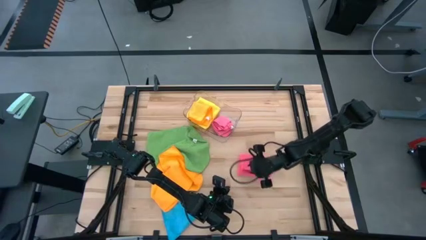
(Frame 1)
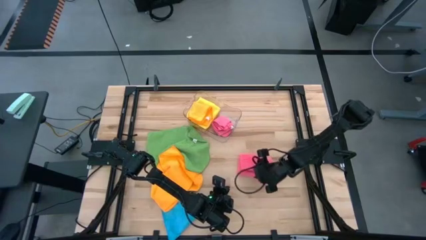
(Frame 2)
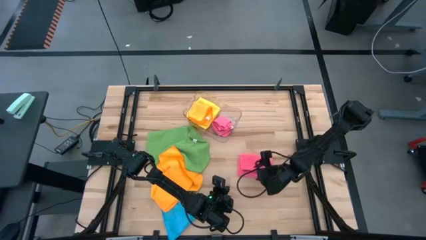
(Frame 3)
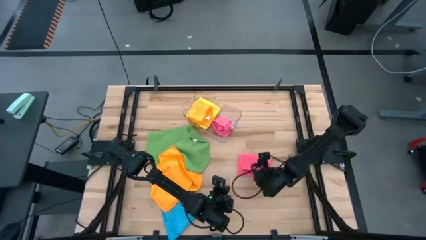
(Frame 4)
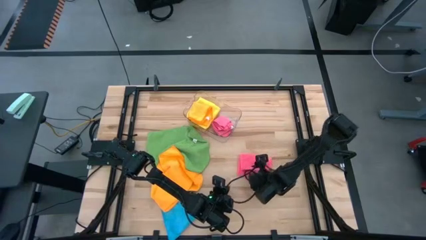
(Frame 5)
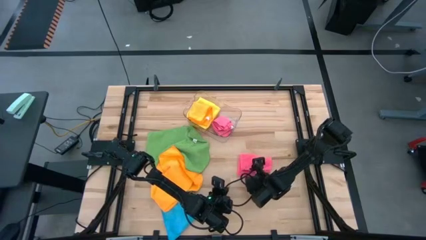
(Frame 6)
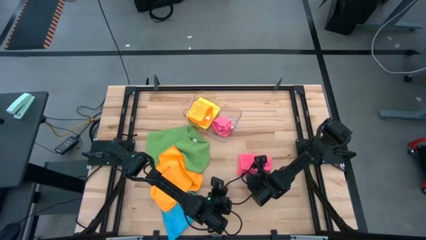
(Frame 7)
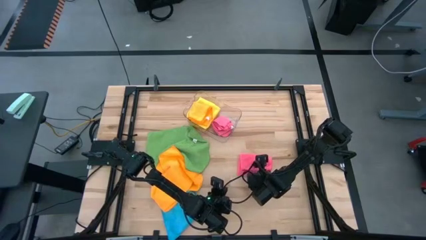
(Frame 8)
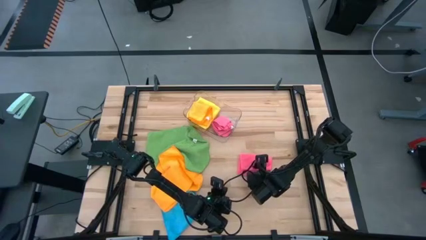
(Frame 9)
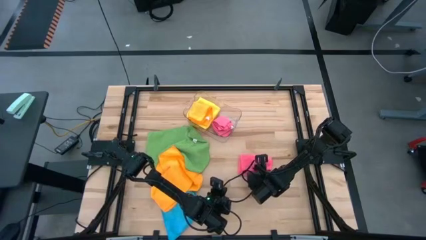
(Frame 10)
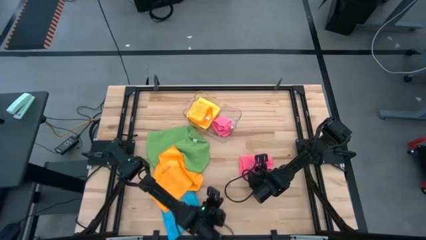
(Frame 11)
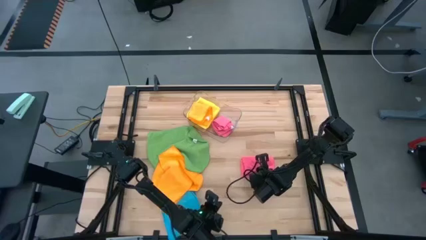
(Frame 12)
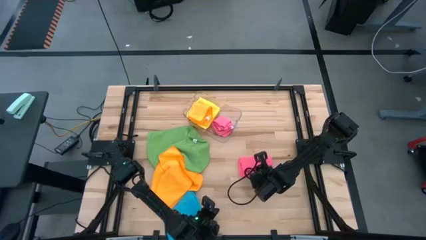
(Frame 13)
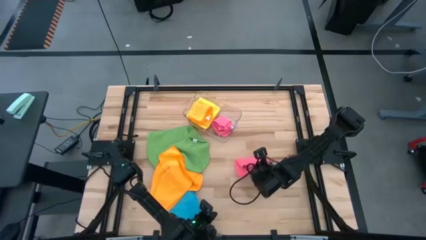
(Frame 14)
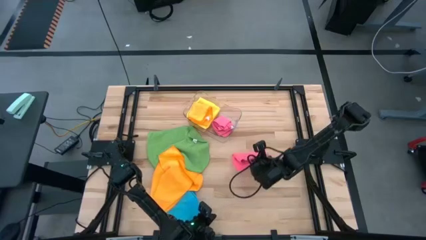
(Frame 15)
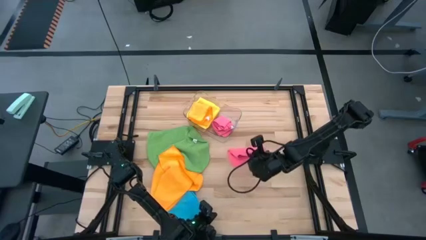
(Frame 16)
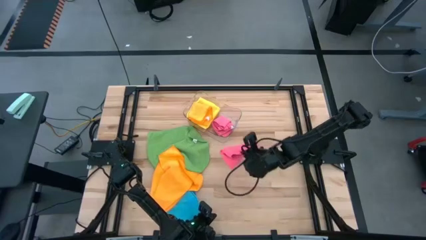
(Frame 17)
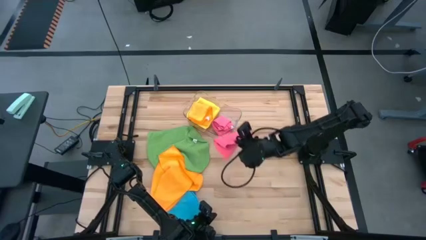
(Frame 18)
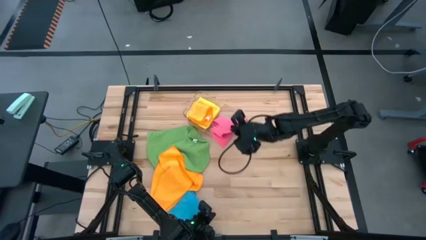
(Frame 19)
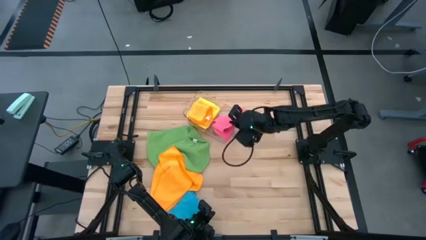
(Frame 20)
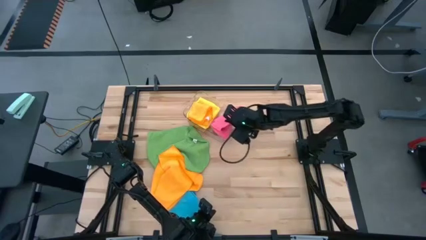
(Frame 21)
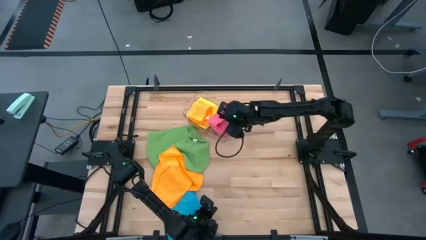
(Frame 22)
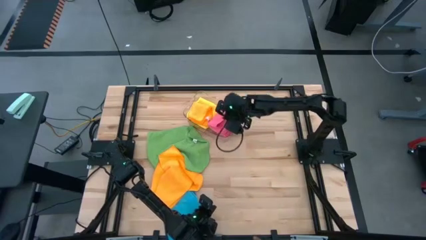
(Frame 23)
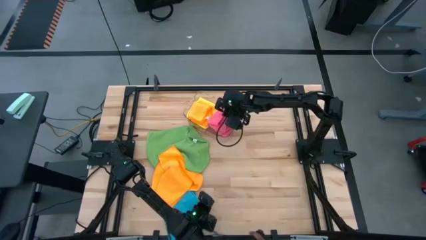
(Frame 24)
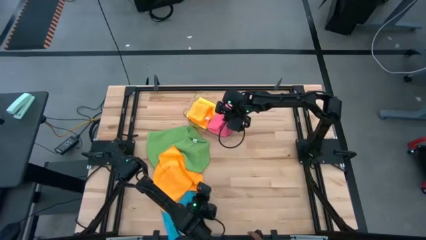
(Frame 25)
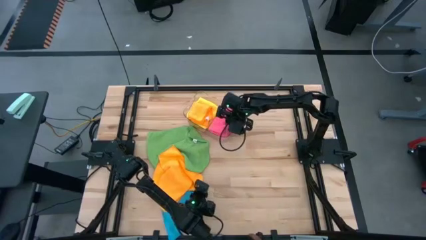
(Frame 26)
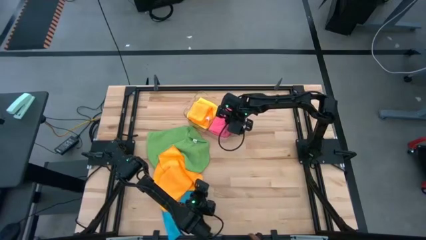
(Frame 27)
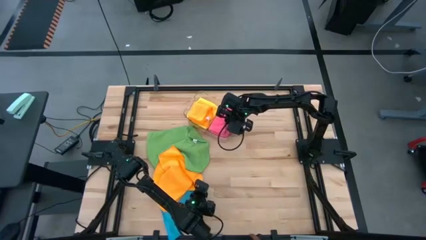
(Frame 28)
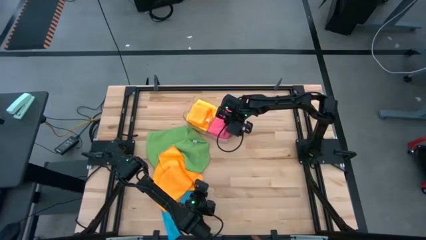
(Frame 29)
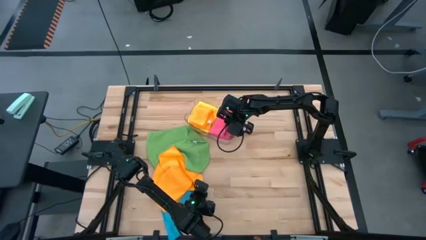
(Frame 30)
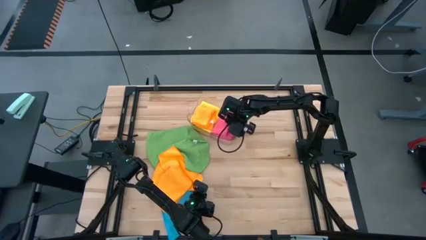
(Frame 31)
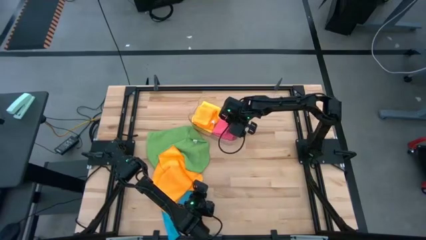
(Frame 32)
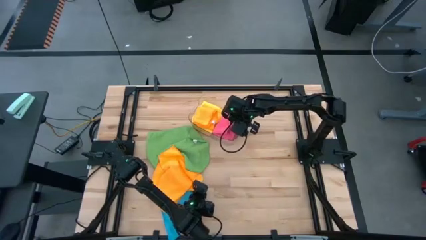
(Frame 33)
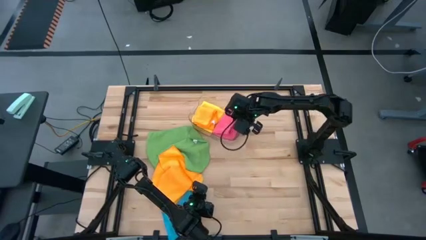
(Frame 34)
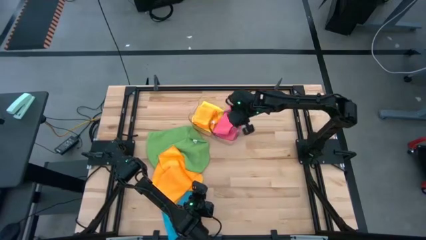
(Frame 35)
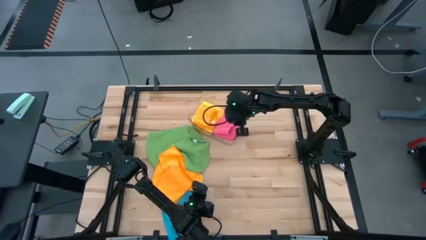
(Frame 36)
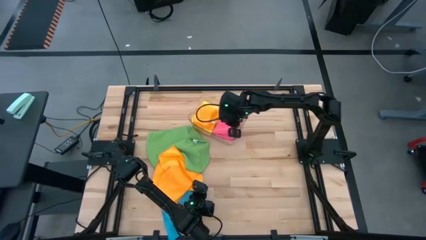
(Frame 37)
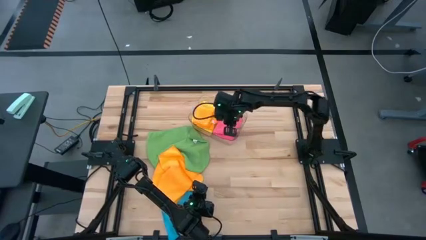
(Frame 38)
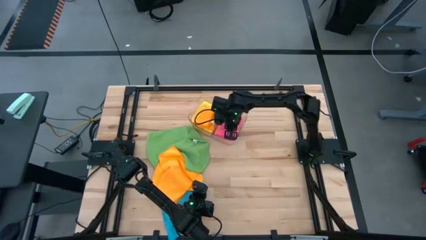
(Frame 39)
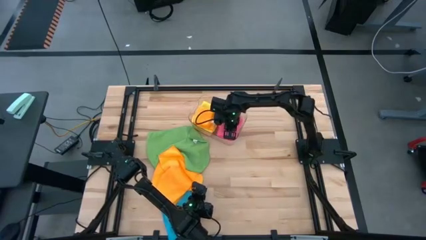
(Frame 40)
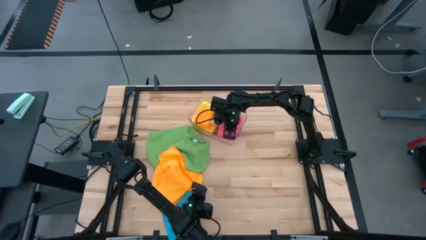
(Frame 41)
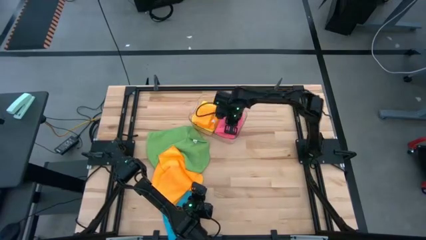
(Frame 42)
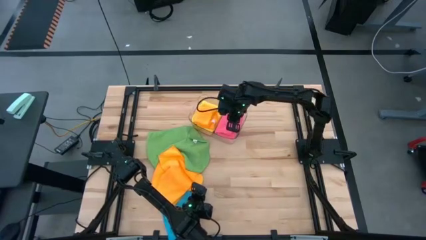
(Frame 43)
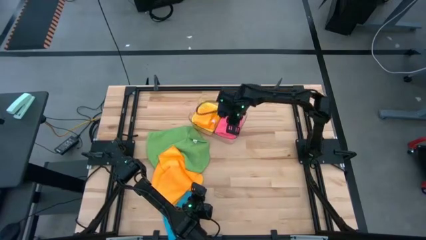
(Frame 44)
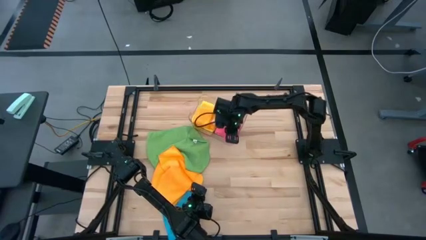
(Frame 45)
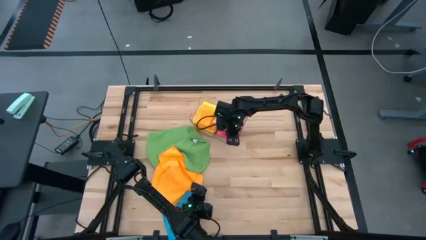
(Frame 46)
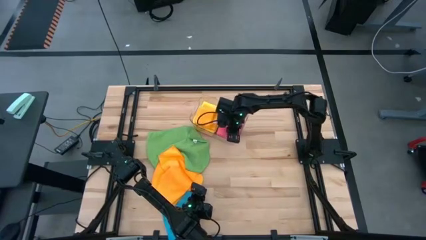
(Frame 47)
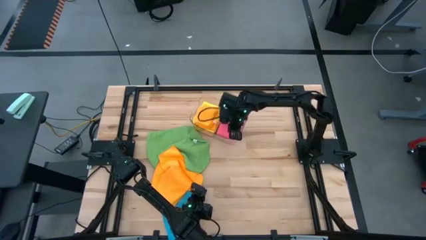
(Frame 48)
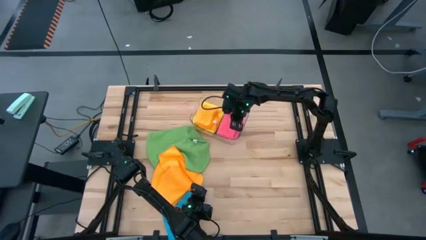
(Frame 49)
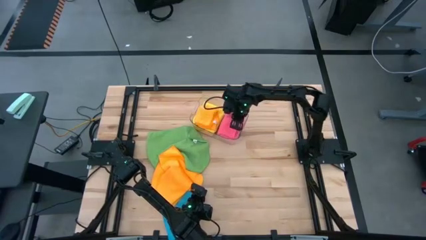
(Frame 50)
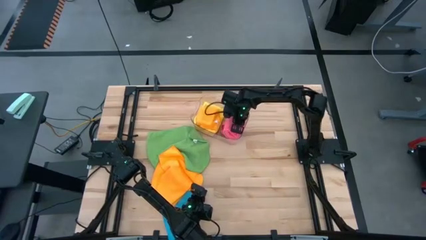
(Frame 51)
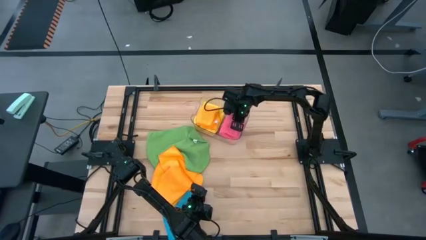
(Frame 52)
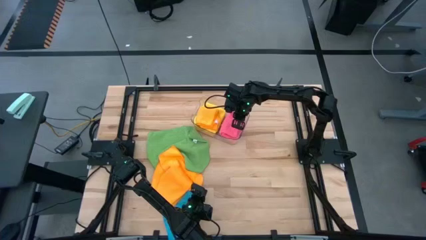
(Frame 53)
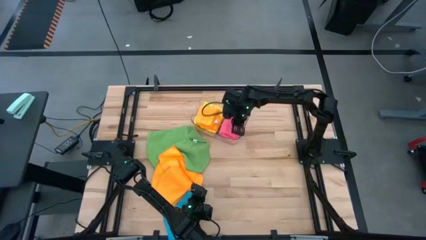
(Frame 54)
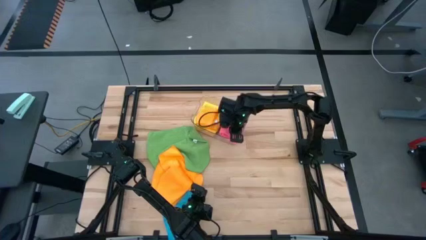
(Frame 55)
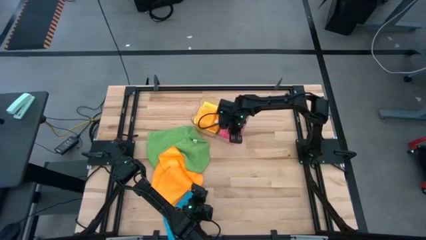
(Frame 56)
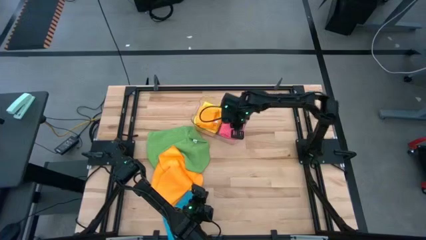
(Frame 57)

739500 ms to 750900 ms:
Task: Fold microfiber towels
Put the pink microfiber cloth into the transparent bin

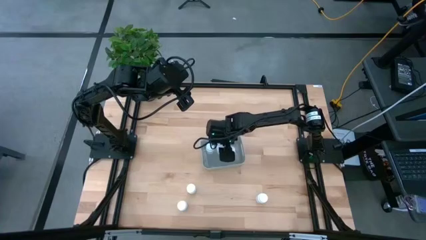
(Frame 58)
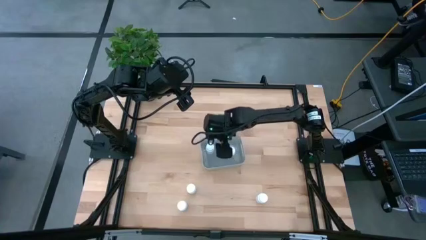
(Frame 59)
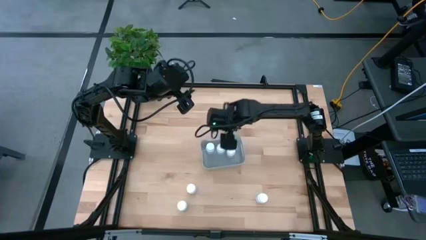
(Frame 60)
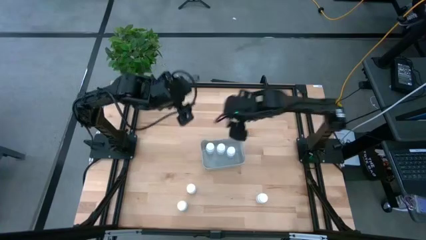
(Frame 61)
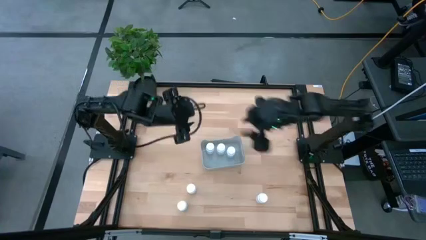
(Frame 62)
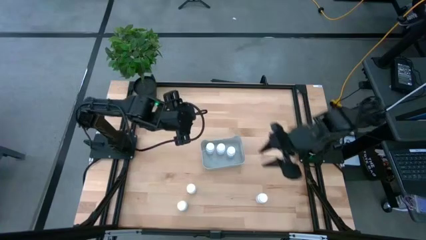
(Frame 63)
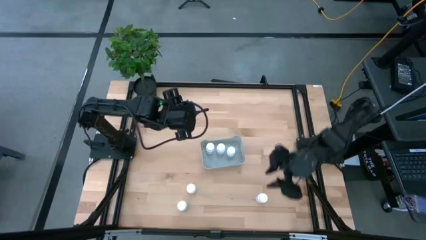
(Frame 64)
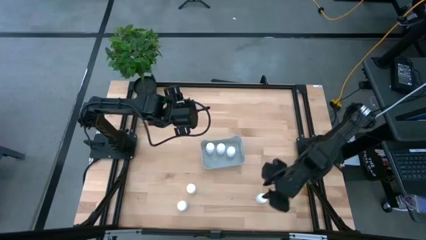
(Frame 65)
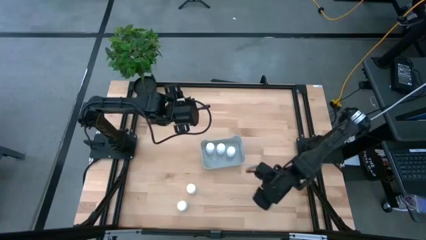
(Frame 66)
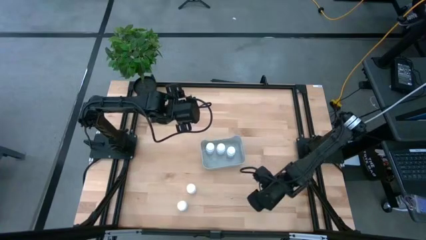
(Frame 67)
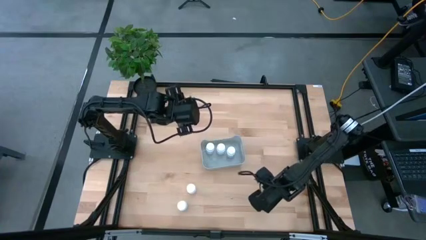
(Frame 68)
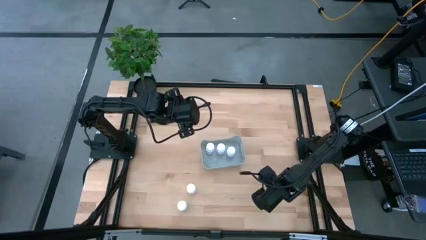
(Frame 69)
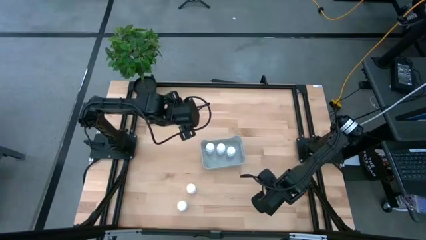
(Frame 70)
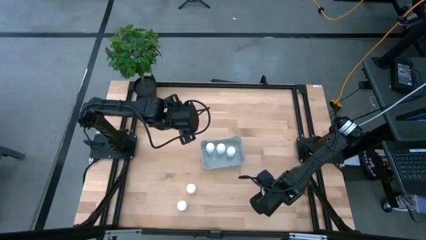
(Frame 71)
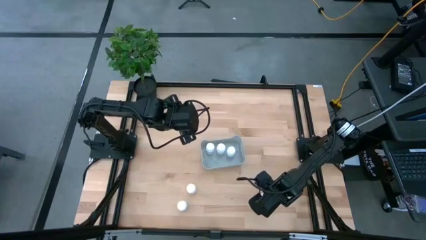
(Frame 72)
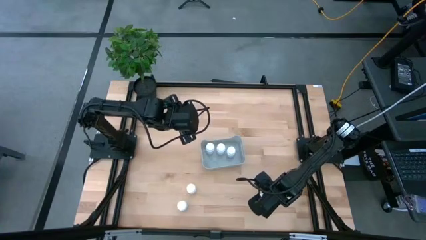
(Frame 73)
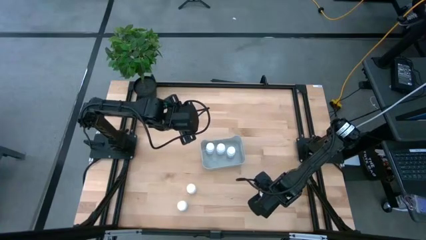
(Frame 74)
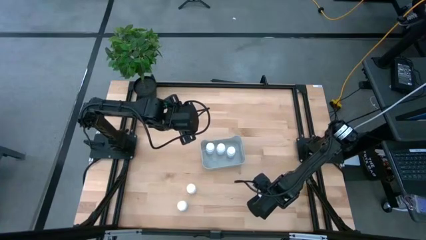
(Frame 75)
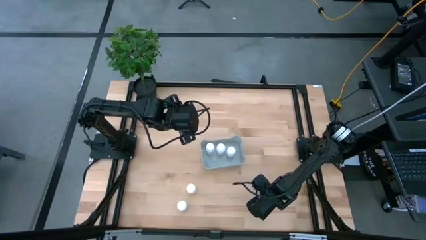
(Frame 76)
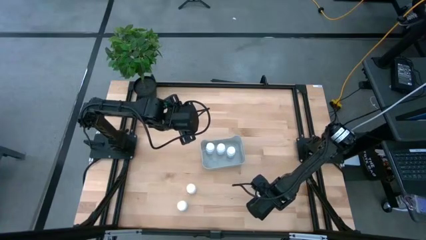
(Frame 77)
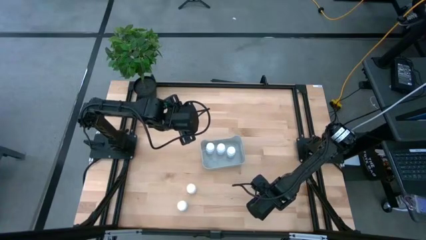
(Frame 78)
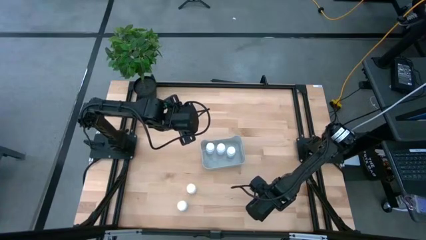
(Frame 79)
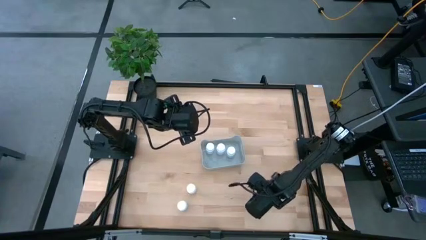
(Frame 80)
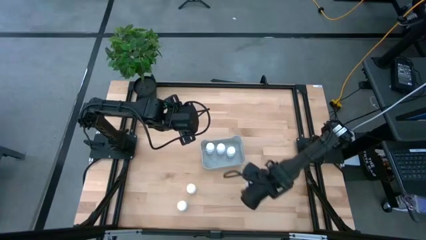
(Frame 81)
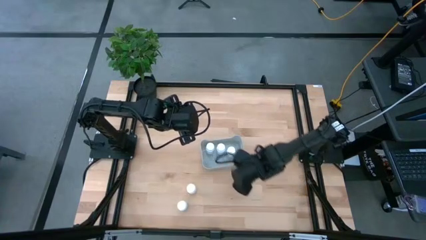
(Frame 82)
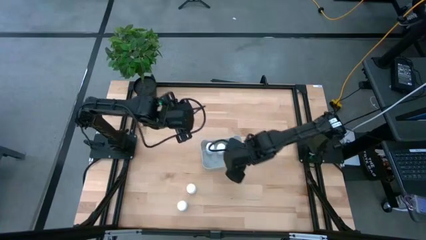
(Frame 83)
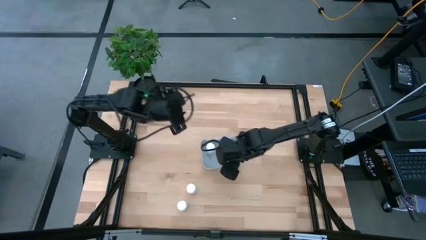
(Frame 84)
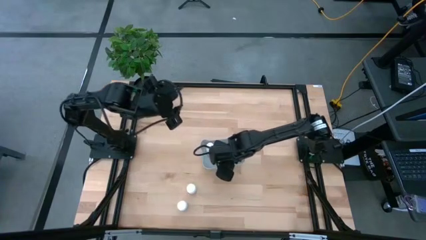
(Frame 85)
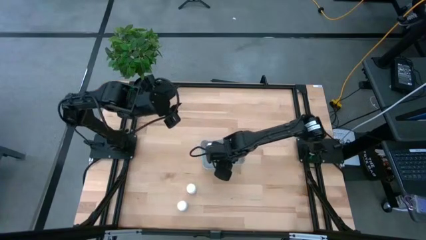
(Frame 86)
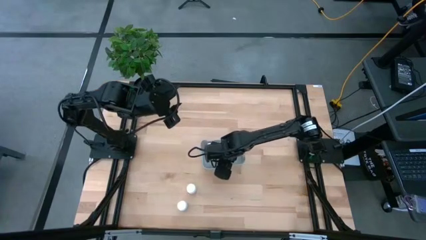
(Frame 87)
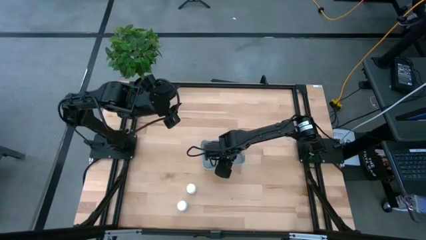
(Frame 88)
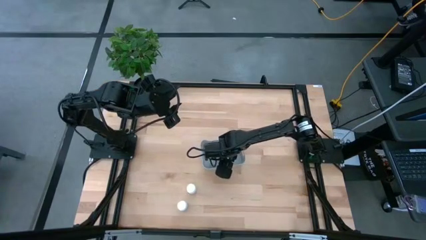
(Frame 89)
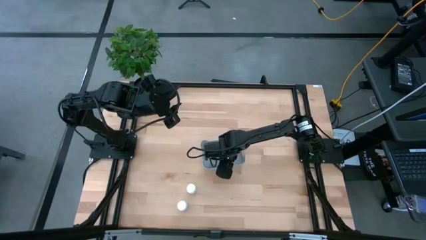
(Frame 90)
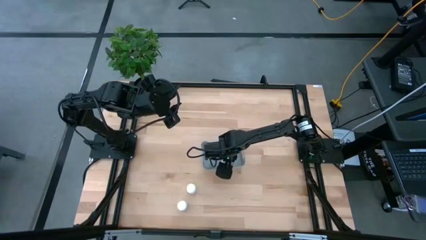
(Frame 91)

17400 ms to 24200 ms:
Task: Pick and place pill bottles into a basket
Put the white medicine bottle into the gray bin
